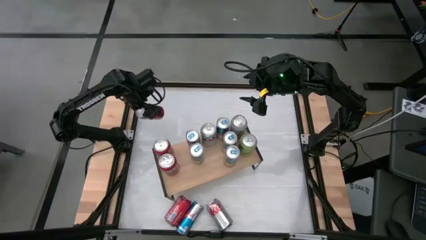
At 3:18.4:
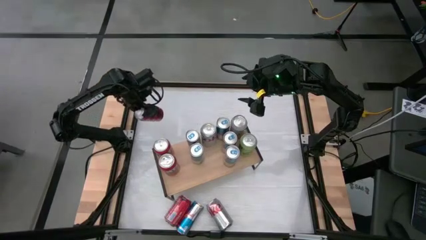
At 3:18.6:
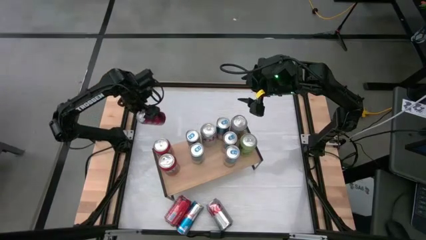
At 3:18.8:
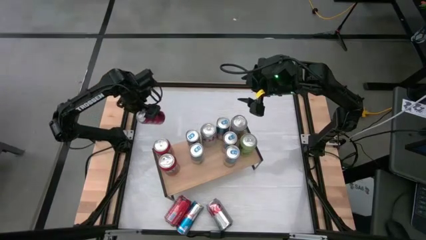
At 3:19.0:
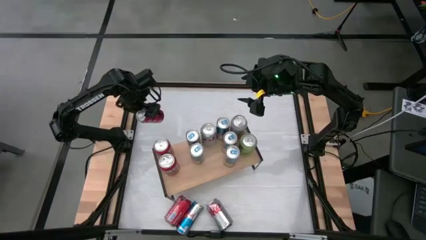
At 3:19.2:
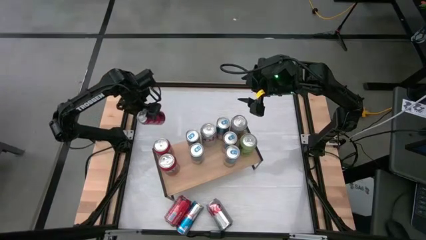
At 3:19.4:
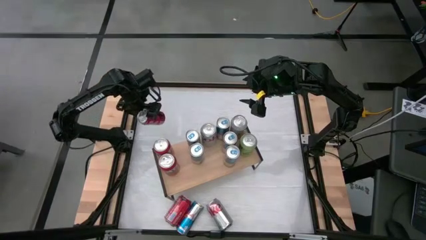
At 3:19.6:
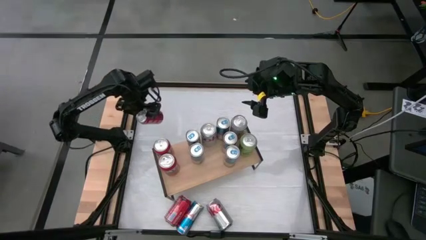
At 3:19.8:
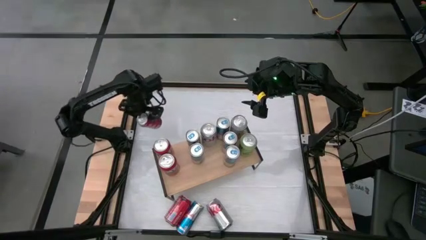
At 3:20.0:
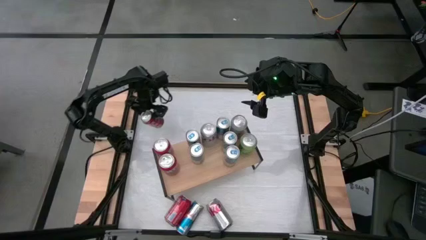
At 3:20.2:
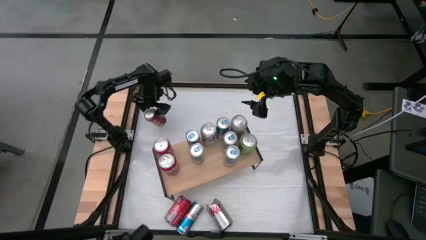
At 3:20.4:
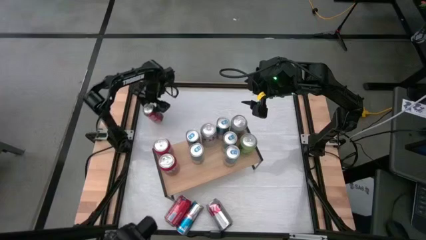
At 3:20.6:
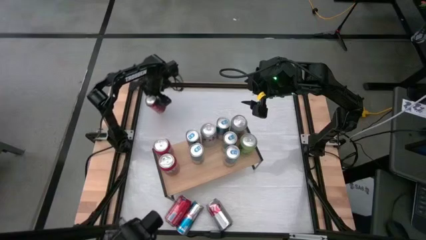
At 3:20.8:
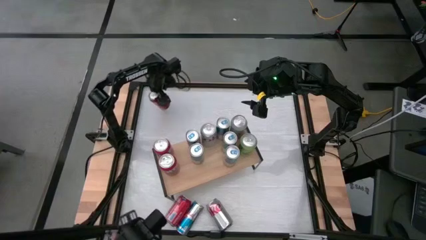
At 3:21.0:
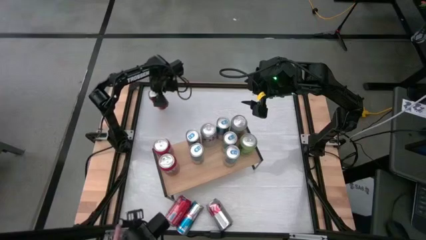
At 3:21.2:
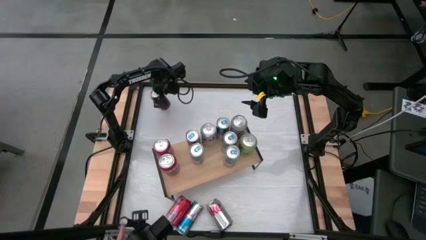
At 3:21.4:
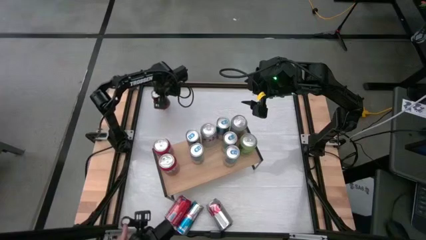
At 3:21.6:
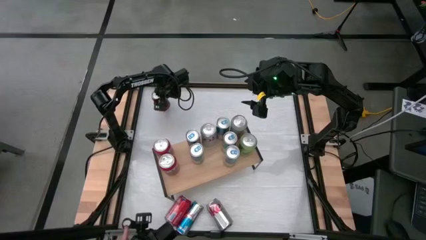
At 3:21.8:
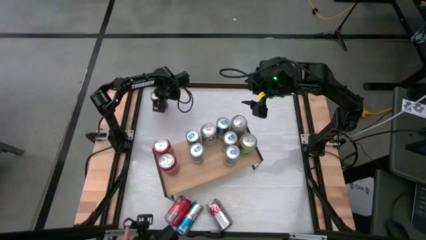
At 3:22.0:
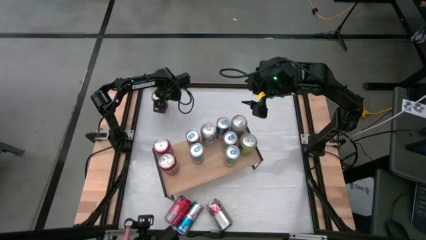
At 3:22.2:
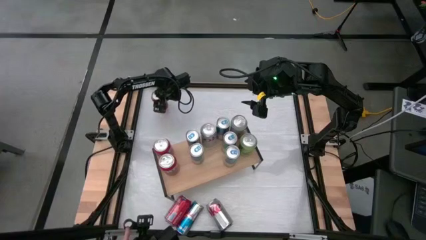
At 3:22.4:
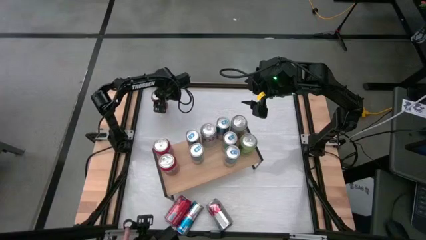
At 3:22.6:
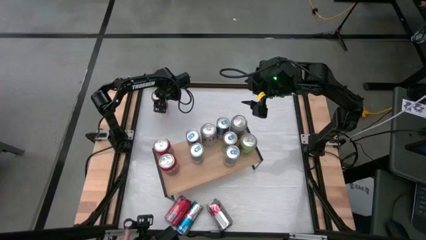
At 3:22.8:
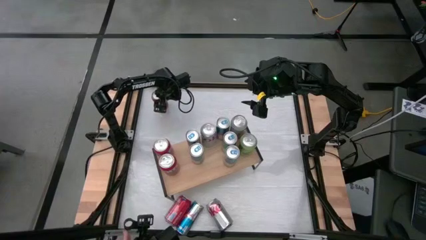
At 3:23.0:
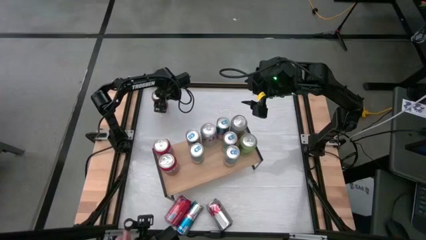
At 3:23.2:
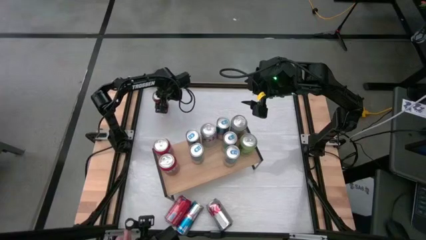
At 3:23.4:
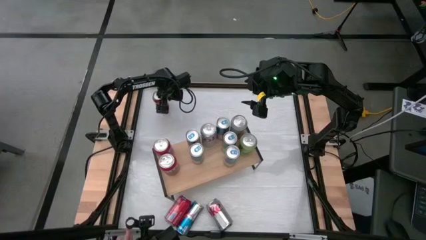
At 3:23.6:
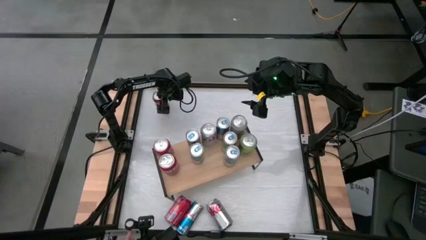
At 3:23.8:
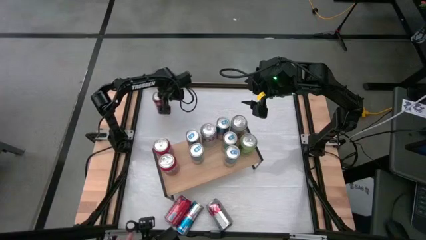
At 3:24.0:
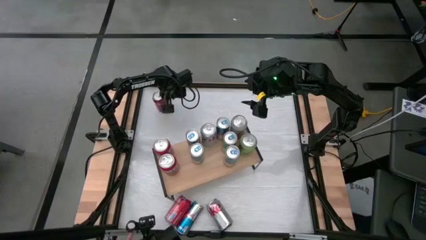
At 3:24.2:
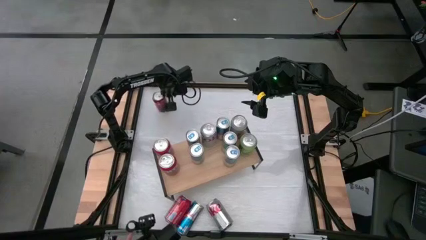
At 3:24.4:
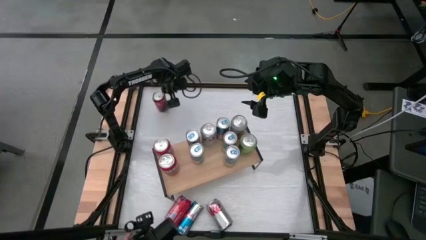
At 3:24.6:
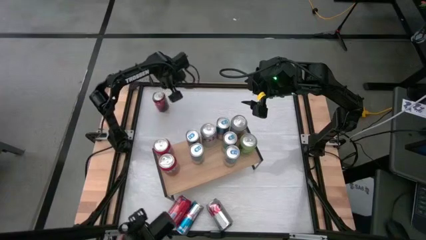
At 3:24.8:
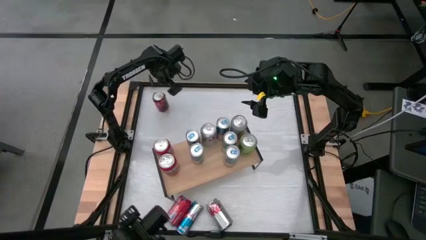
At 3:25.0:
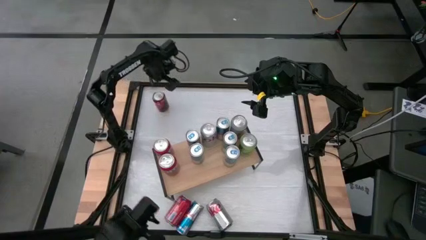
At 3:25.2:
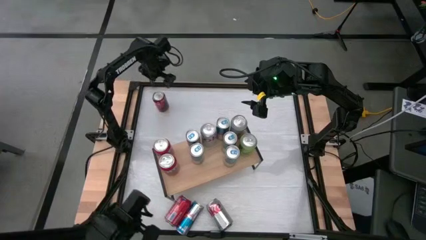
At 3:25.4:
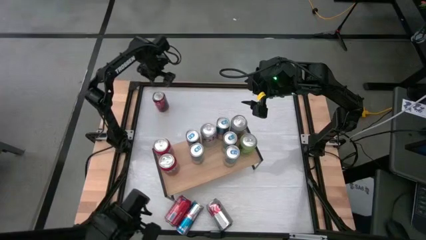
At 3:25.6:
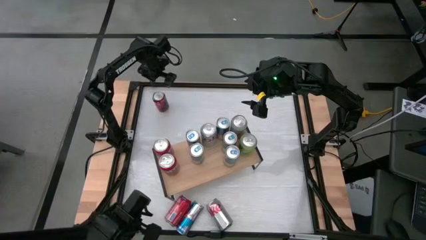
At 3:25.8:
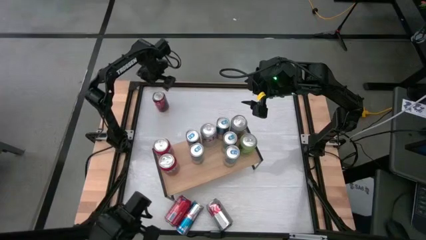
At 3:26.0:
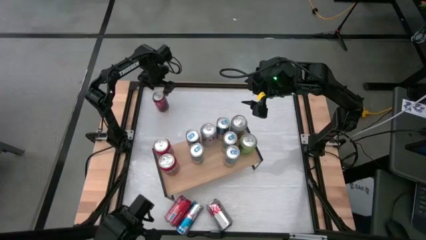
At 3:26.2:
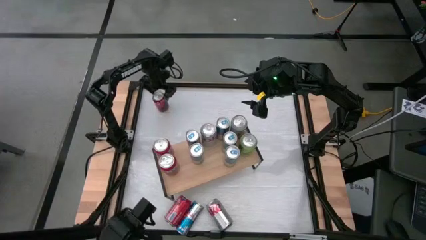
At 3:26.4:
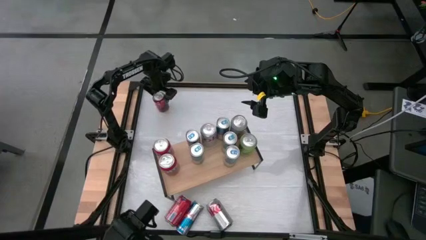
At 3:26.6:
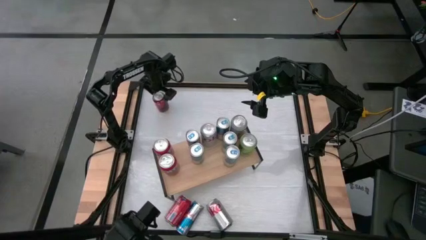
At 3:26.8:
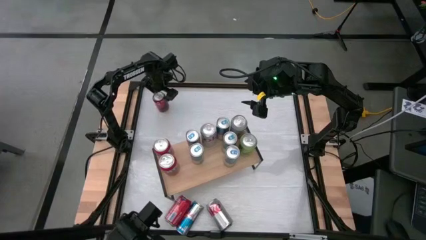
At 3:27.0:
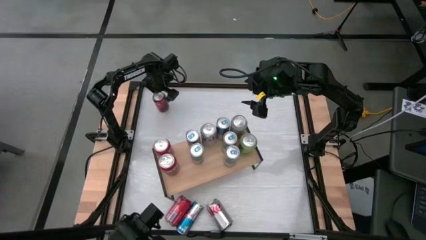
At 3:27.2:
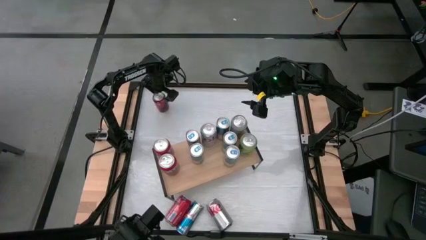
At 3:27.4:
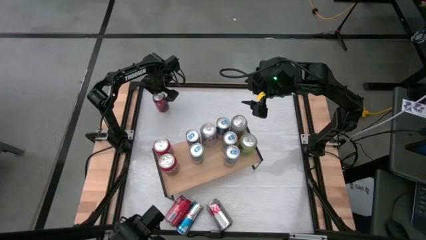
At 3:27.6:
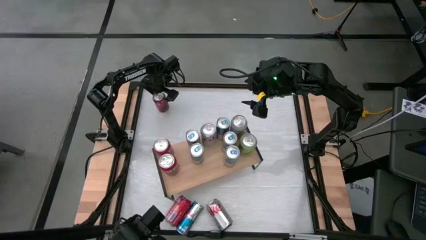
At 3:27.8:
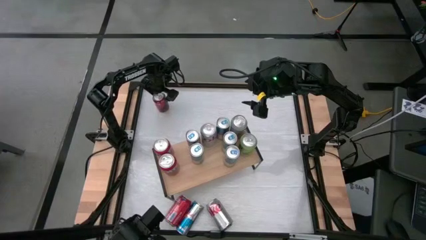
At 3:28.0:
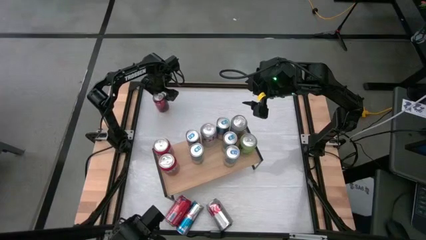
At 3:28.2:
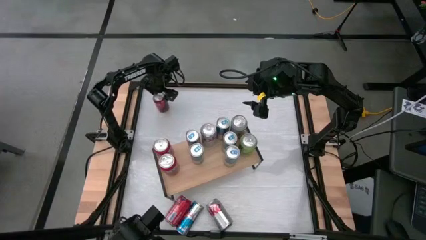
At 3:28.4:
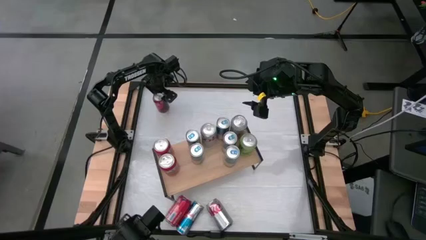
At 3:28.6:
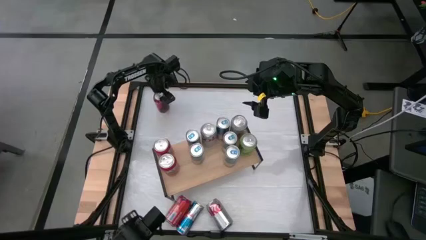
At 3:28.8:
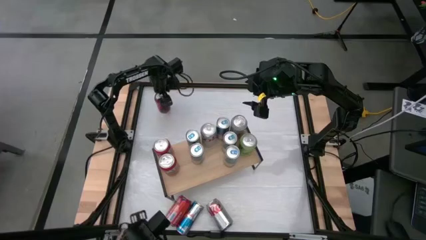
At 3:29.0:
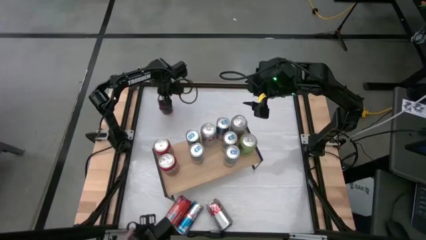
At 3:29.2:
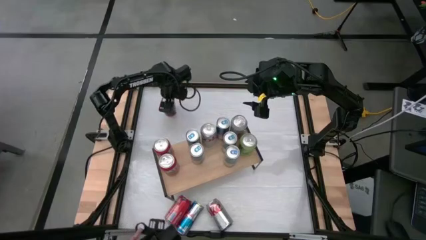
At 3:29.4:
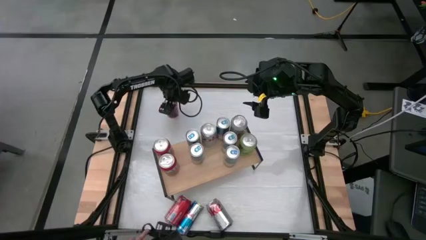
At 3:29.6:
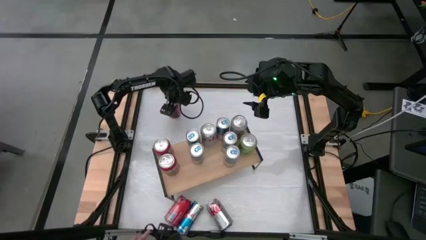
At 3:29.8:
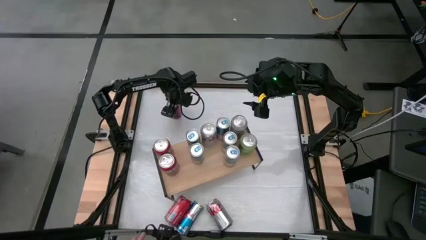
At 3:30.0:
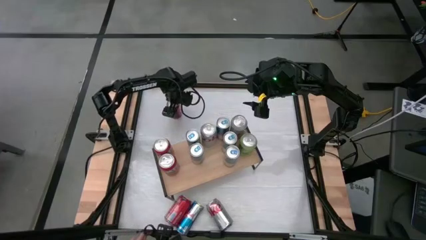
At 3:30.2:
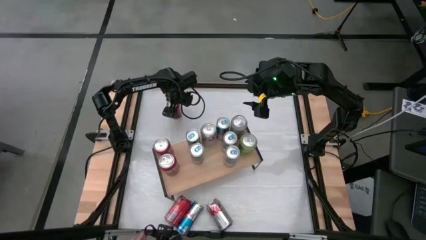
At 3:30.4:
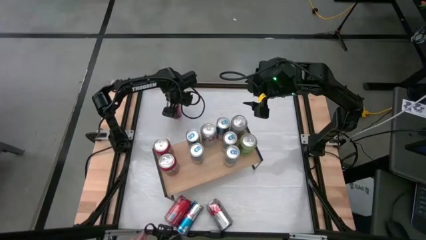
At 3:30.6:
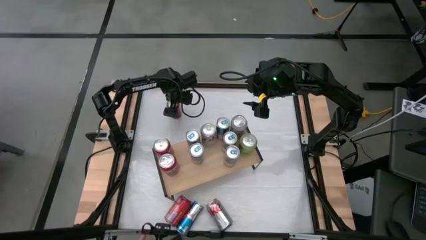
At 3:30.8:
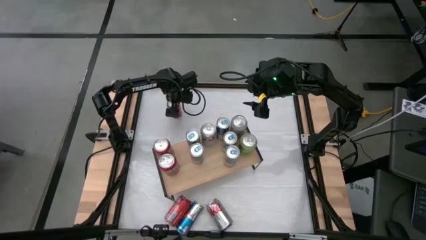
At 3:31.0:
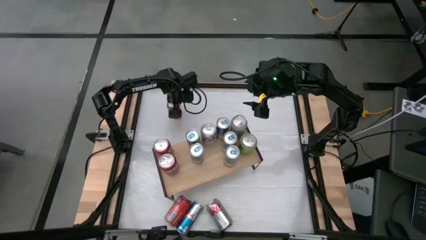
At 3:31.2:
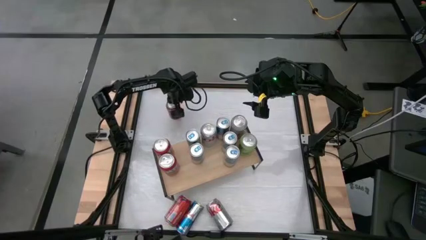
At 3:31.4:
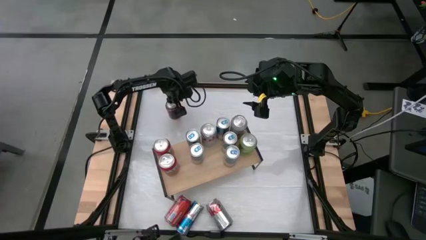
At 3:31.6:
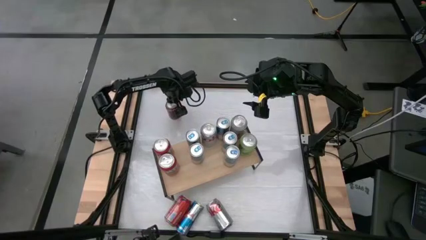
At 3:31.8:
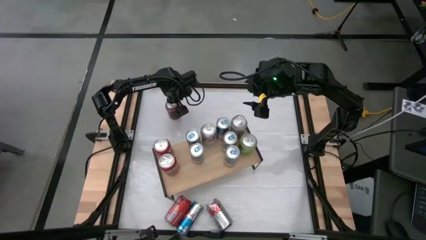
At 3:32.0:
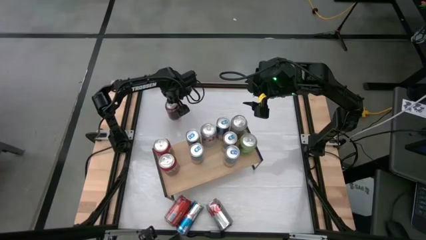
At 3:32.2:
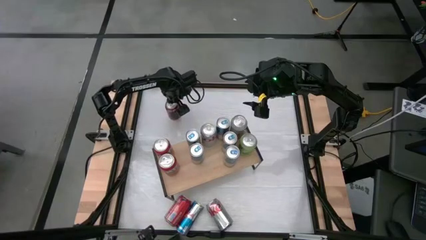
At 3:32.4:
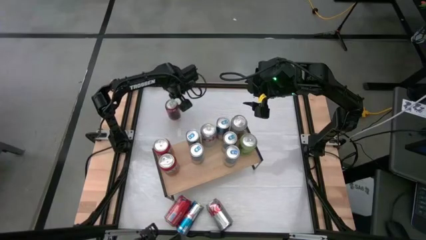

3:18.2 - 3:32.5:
Task: Place canned beverage on shelf
Put the red white soda can on the shelf

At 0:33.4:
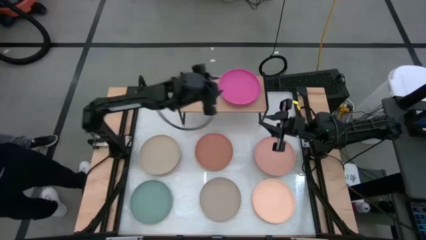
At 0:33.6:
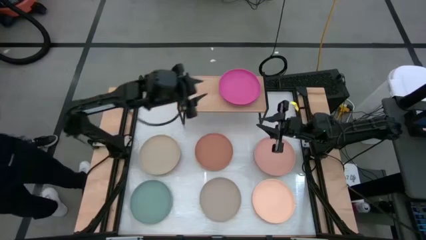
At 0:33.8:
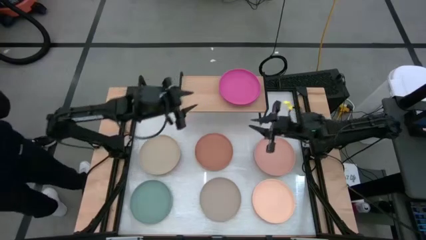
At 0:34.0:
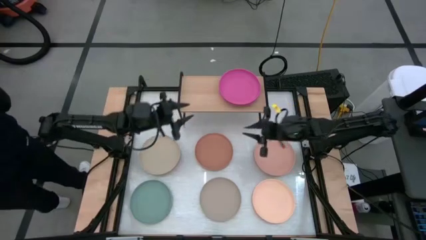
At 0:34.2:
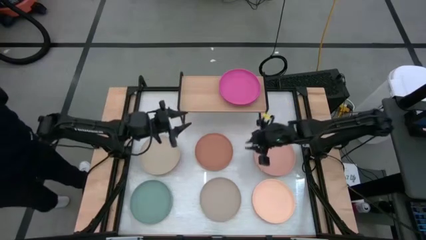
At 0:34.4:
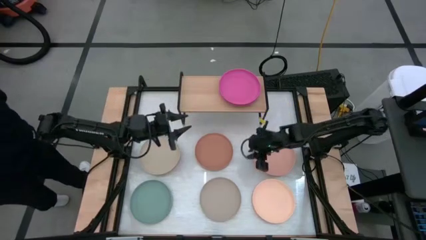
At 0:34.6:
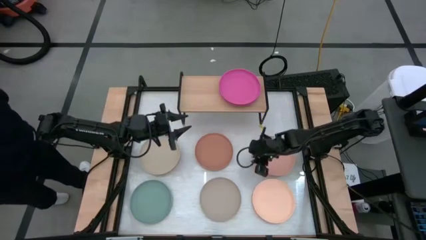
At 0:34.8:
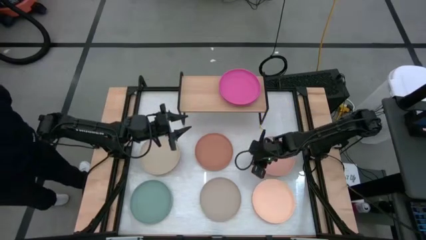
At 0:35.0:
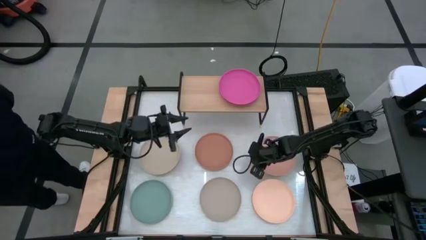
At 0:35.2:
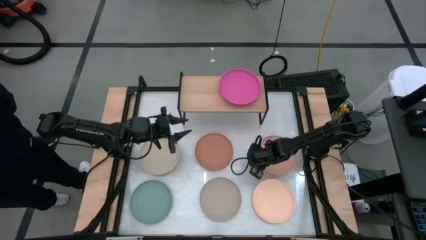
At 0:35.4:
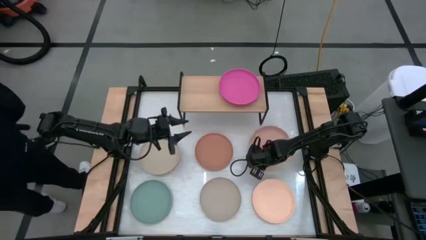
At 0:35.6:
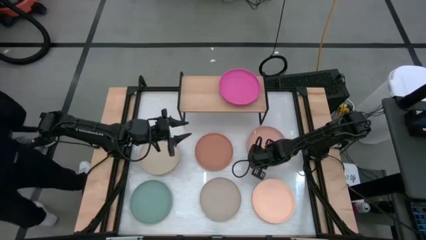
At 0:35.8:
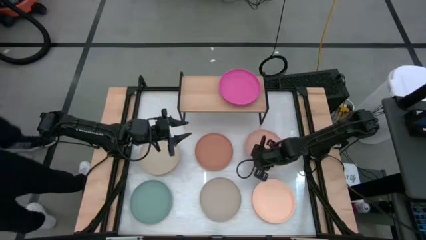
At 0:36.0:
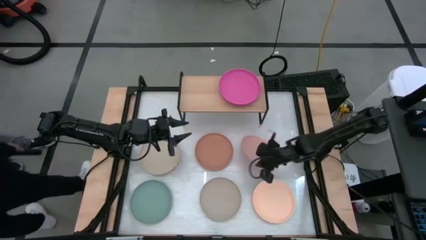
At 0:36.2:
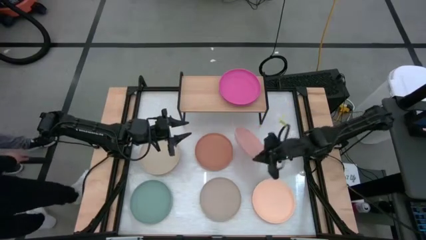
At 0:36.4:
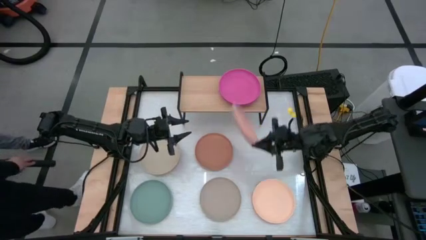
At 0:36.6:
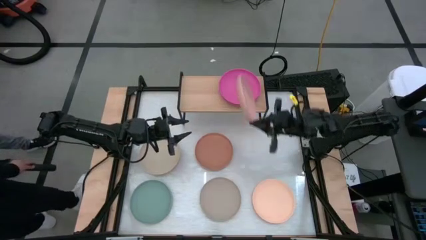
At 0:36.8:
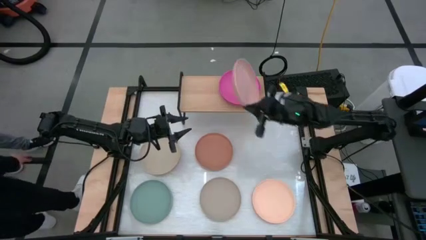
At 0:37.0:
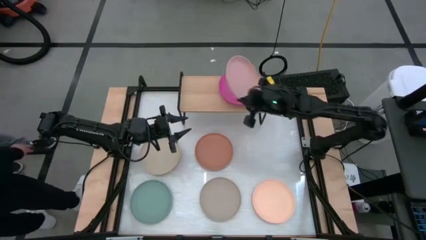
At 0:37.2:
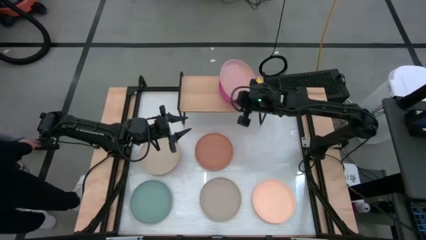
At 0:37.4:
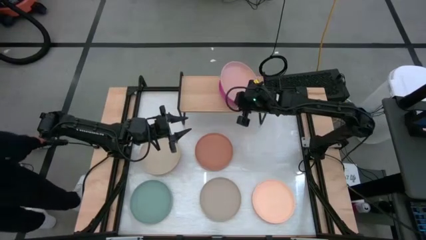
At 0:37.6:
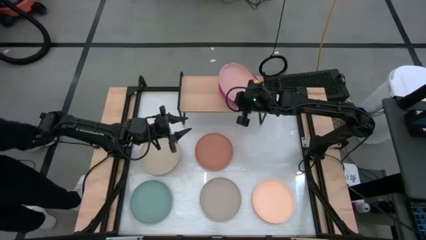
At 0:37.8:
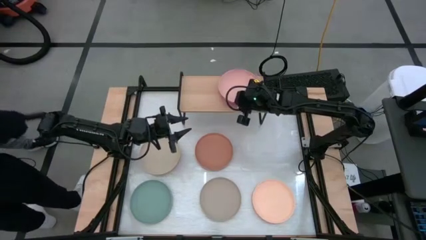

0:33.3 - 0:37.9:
Task: Place and stack plates onto a shelf
Stack the light brown plate on top of the pink plate on the shelf
